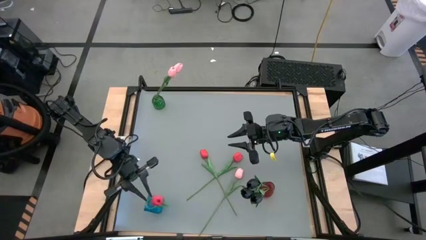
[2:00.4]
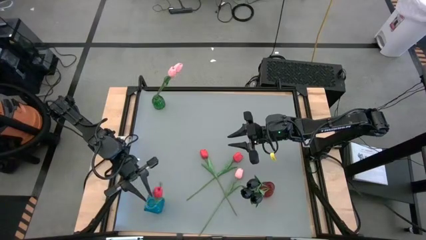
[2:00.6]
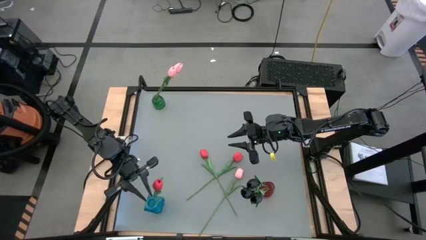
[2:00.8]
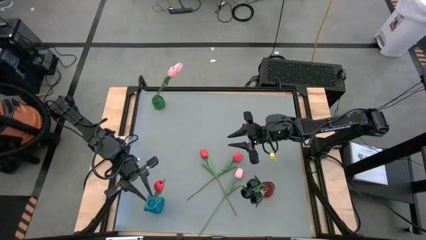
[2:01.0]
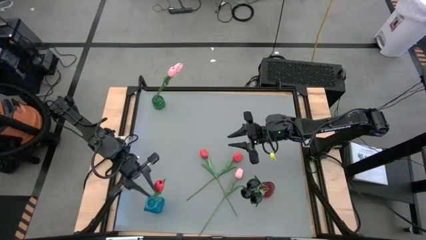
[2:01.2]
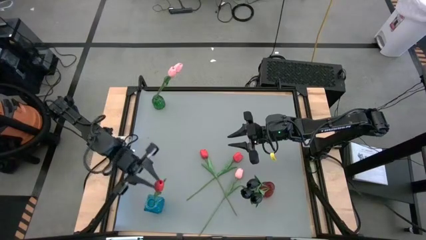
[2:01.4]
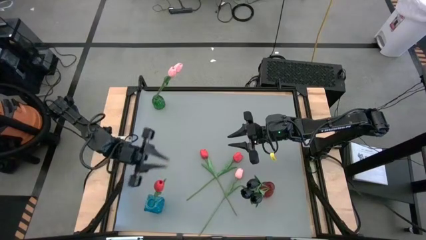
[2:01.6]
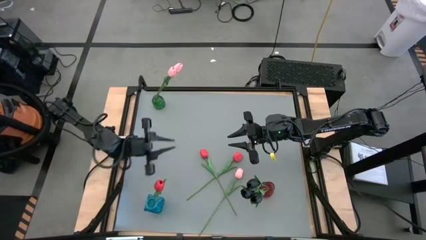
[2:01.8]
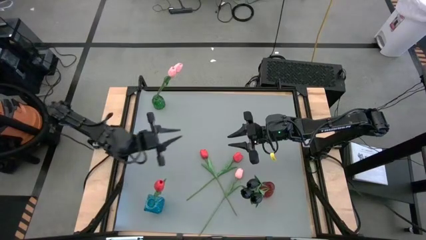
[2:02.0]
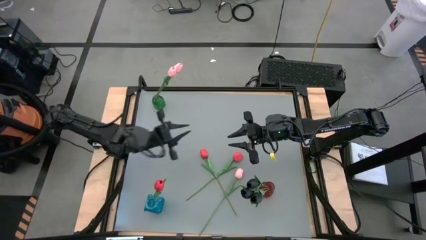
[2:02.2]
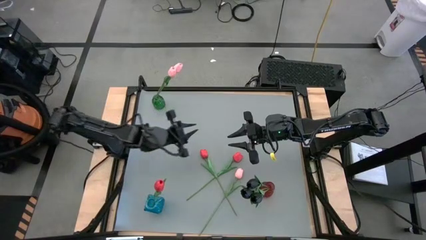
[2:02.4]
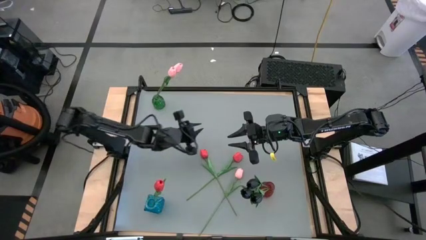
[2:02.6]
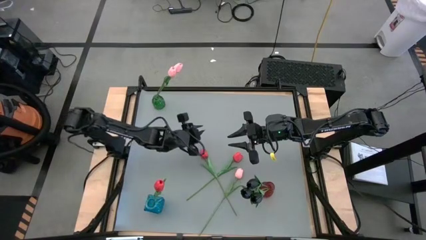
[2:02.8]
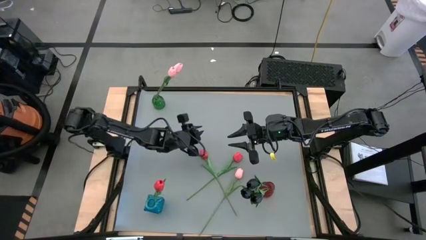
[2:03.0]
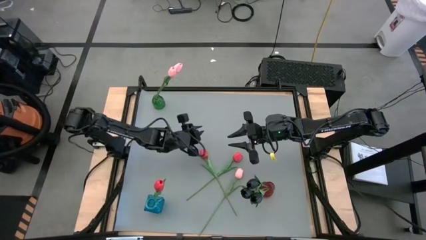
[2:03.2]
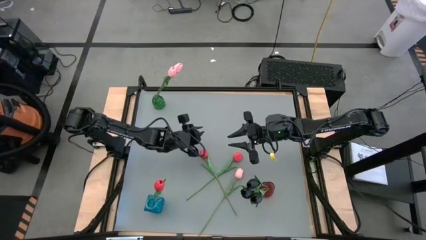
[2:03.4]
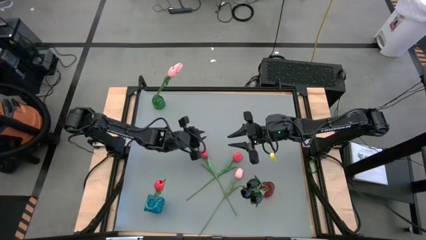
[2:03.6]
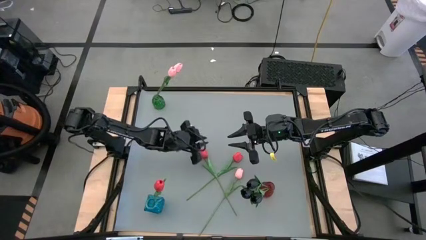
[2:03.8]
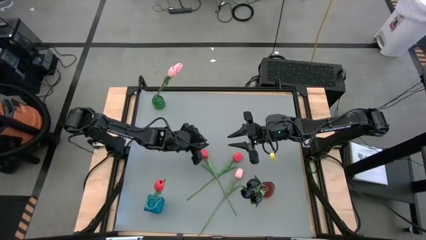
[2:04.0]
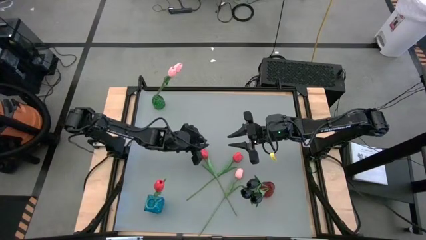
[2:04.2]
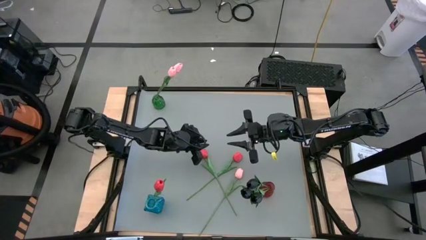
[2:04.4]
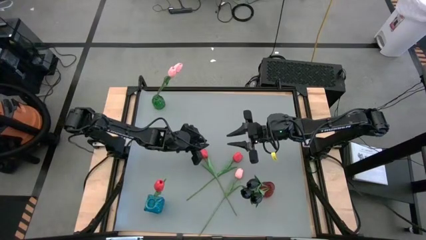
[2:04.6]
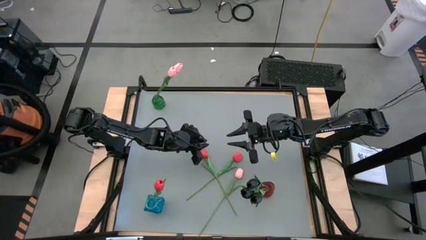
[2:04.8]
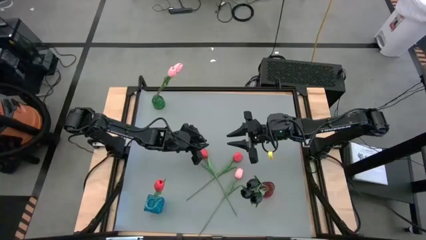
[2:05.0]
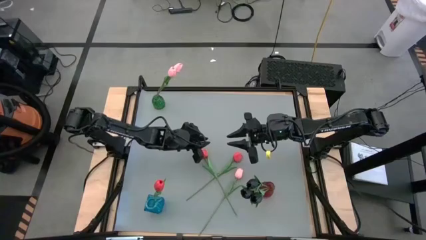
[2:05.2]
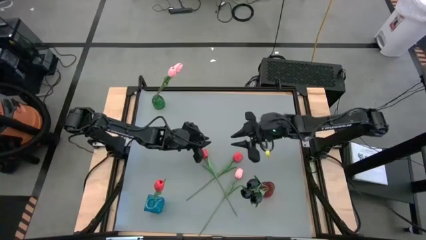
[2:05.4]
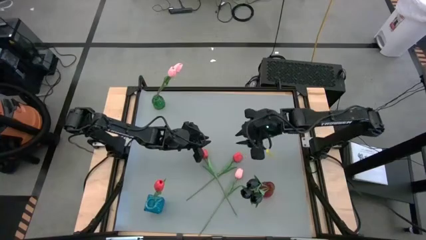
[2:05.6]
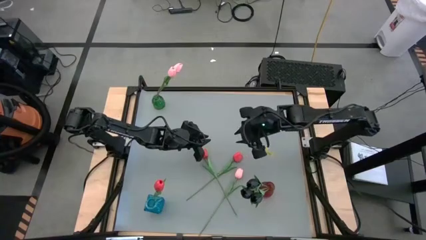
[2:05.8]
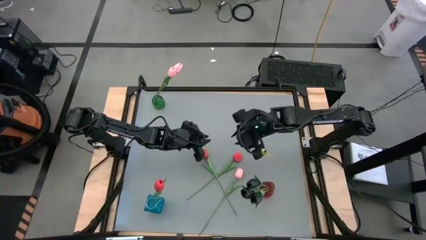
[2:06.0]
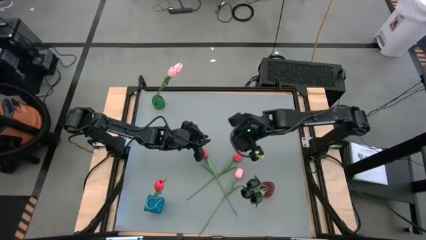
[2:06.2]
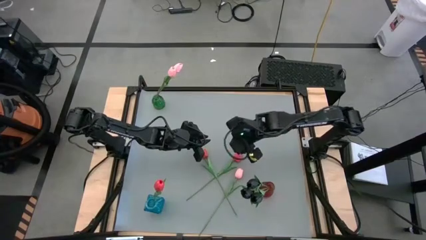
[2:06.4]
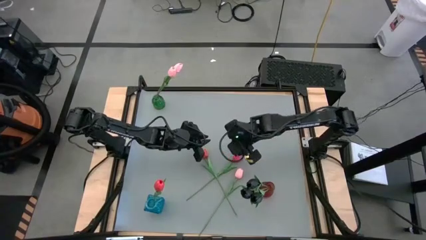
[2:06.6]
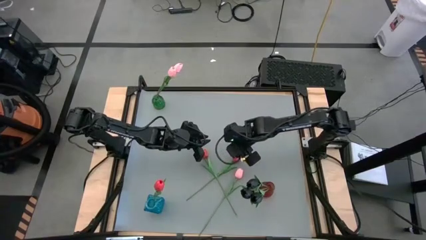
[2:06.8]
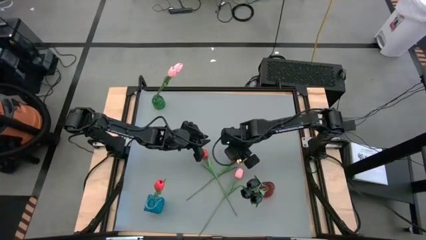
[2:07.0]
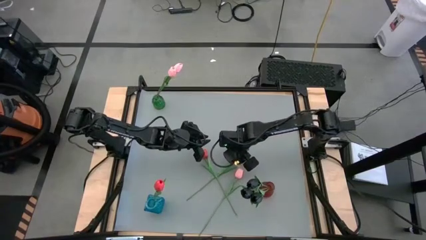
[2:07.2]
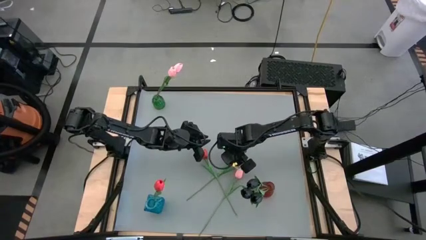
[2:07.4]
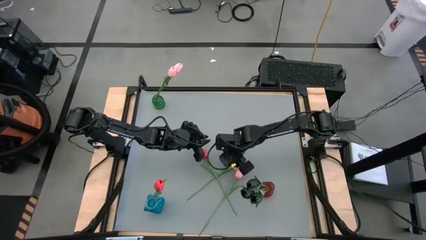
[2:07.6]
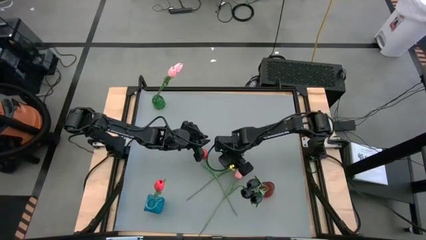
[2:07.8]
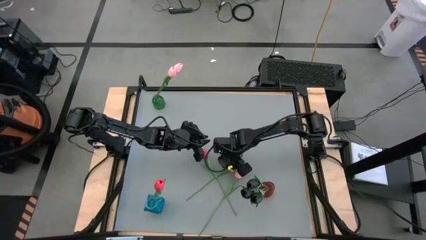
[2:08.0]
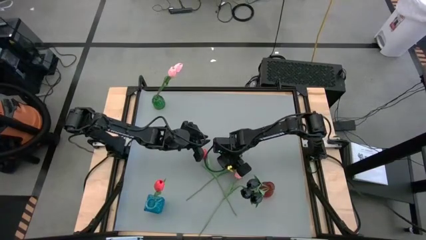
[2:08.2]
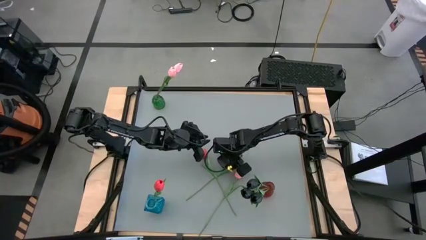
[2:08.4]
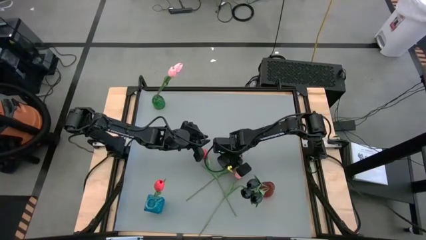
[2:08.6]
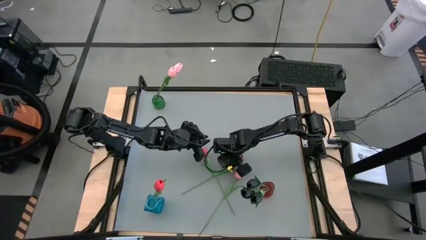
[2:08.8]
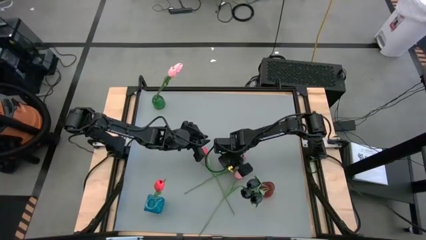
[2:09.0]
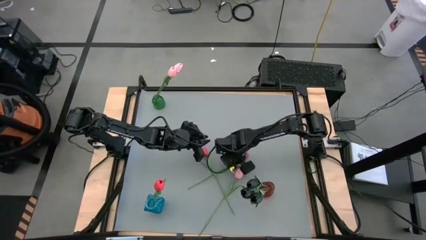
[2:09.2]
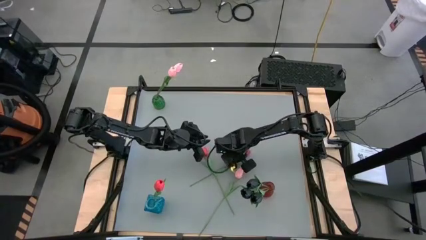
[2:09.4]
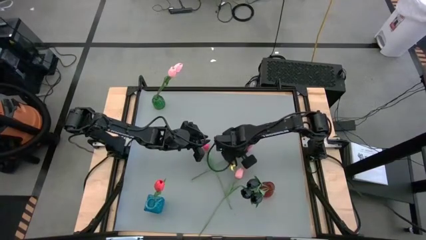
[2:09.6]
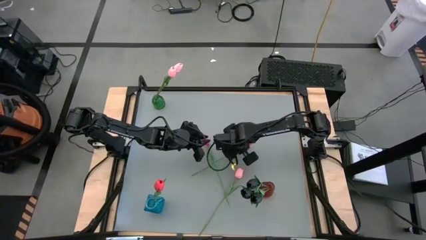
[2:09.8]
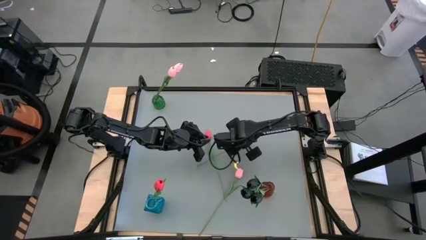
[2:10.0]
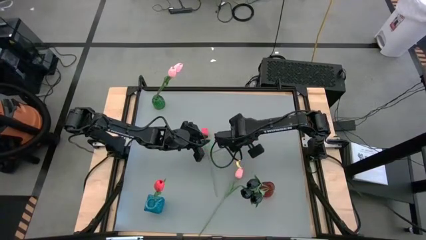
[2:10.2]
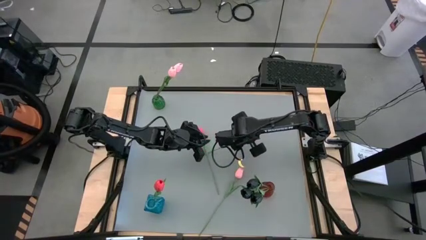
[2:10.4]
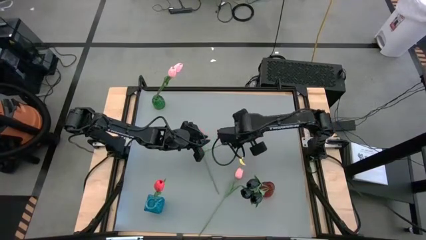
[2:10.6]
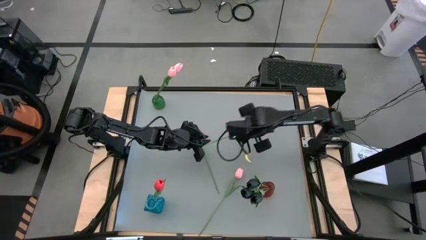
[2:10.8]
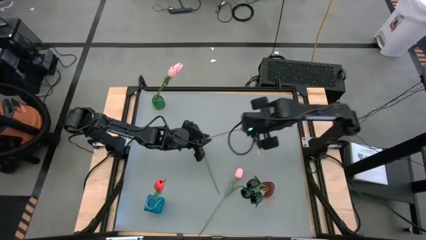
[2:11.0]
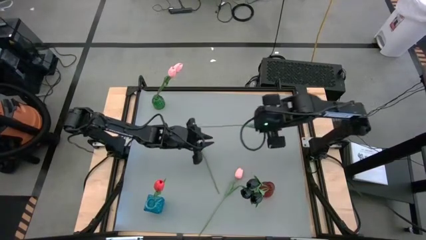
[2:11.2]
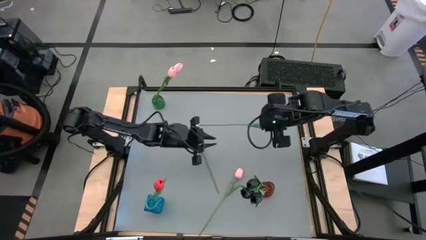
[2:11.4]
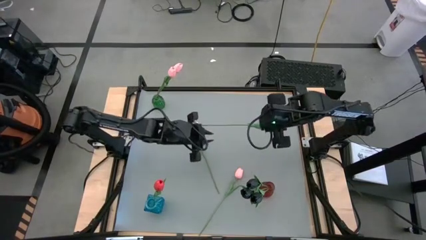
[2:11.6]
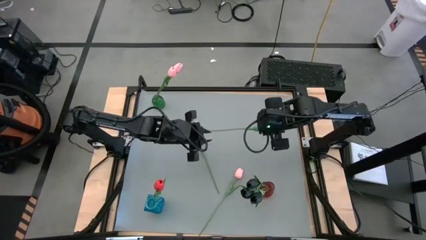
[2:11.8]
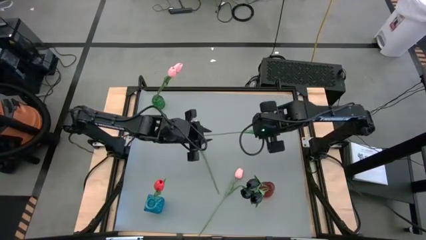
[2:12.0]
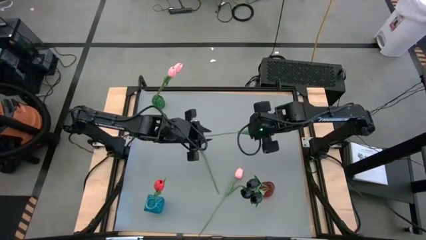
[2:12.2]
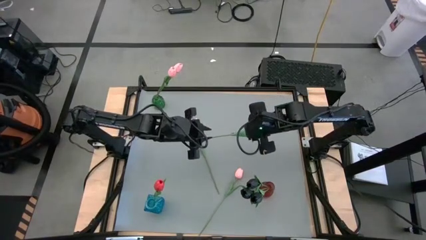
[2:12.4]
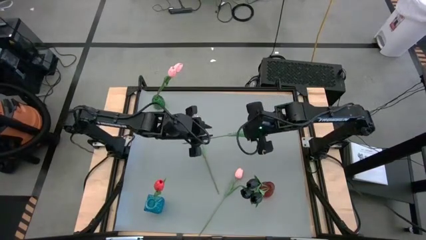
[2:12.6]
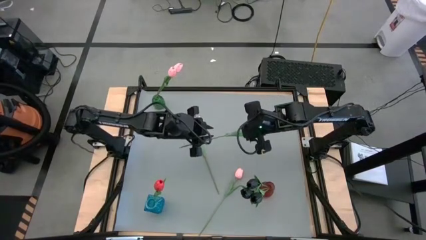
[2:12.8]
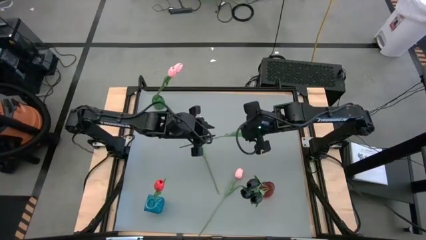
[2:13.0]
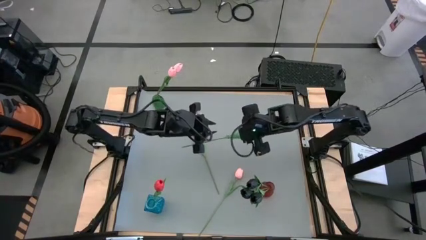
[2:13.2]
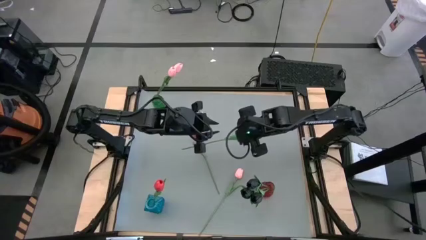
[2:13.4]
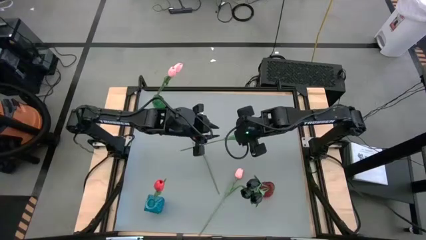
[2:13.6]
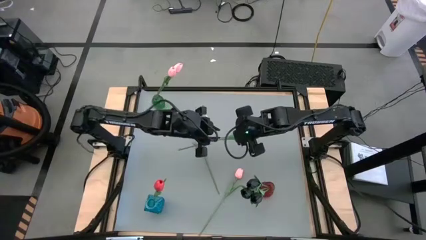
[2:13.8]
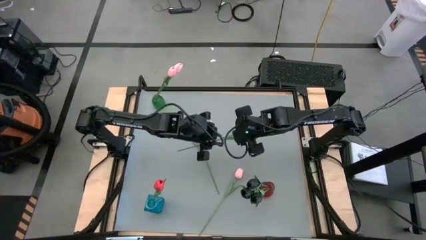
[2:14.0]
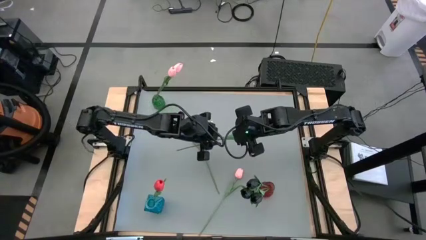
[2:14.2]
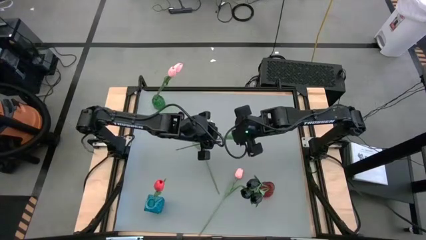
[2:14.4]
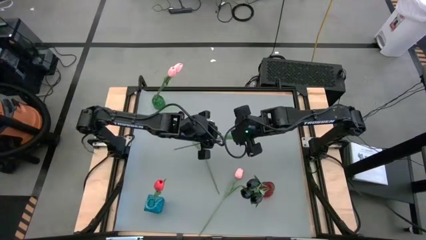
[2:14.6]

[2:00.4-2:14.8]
Task: Sort flowers into vase by color
Put the right red flower into the blue vase
